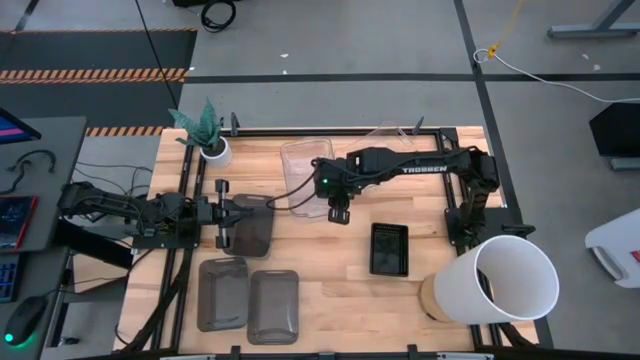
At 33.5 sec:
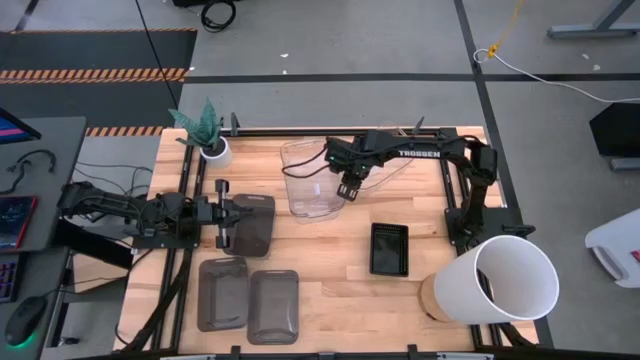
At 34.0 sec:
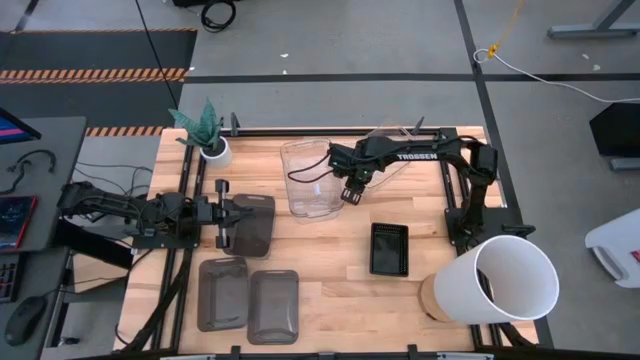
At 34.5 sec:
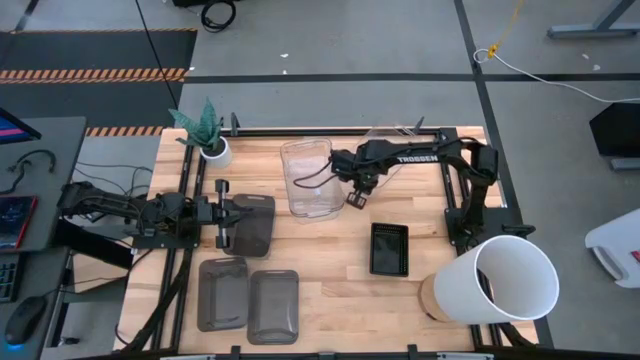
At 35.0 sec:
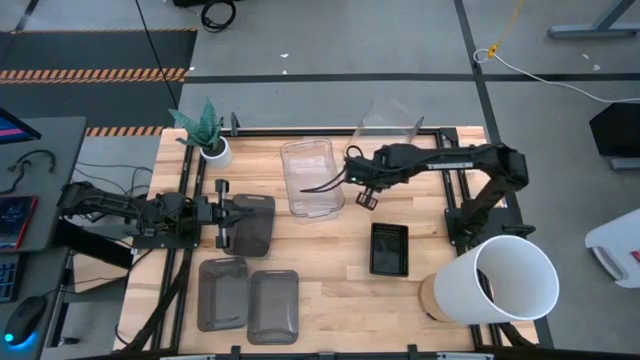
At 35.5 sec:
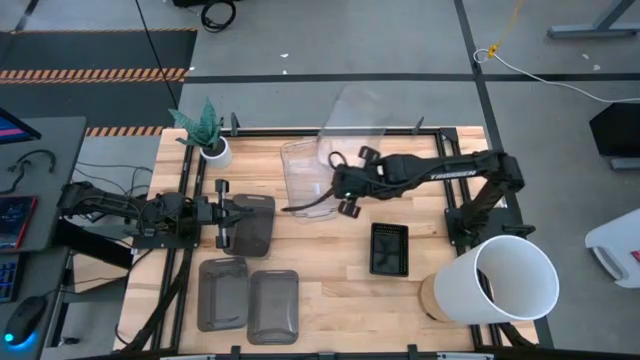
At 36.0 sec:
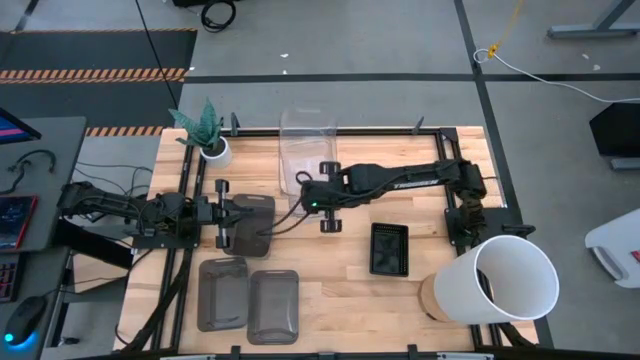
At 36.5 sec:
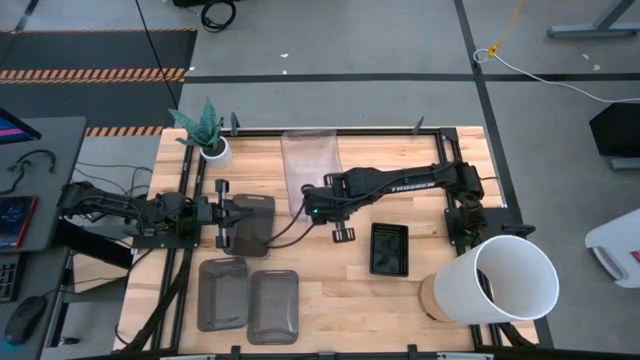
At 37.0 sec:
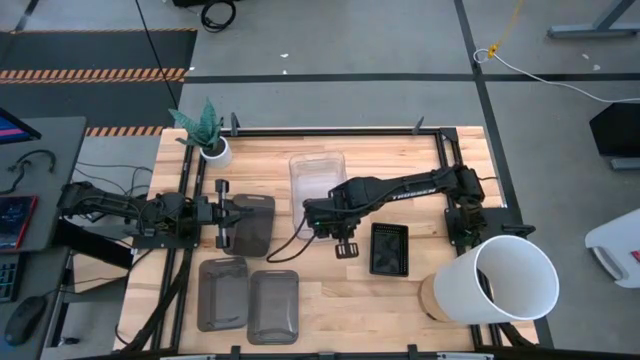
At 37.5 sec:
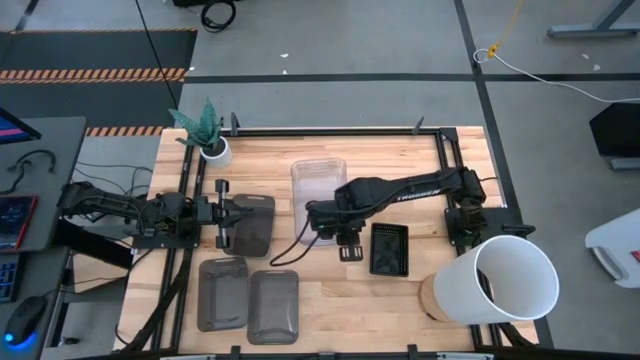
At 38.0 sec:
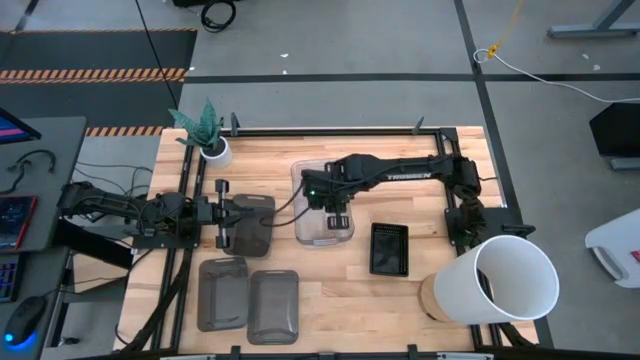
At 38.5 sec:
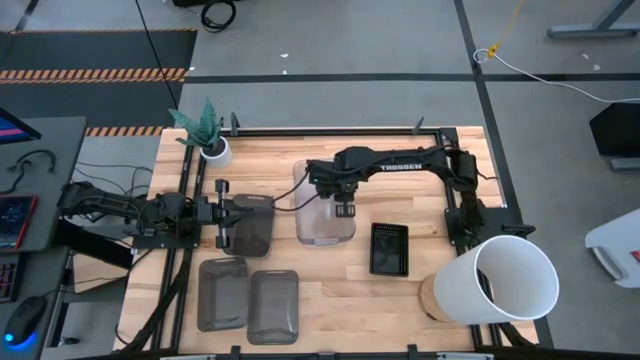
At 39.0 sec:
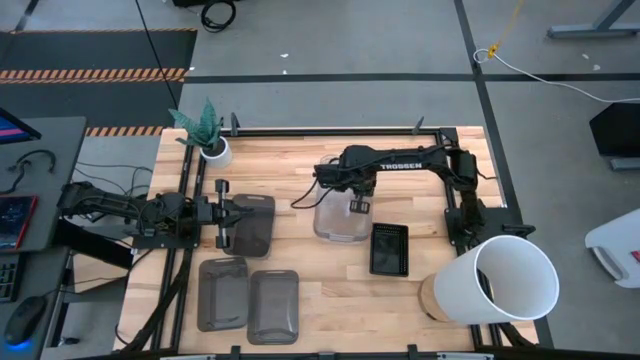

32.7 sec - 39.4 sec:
Stack the right transparent bin on the left transparent bins

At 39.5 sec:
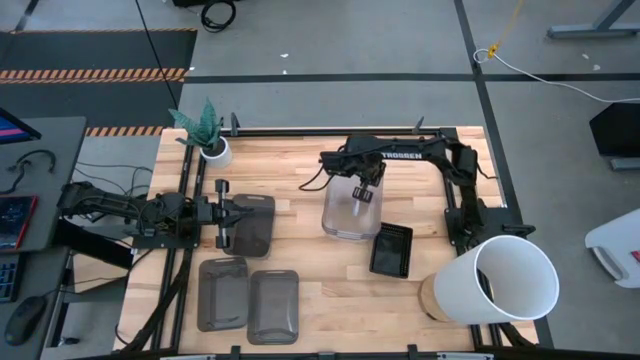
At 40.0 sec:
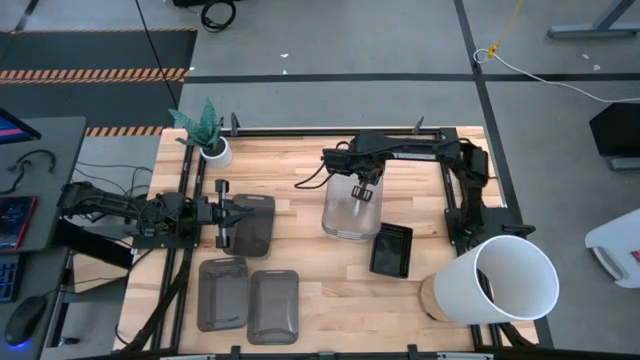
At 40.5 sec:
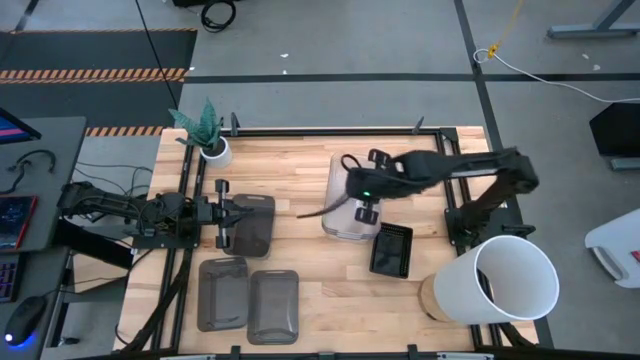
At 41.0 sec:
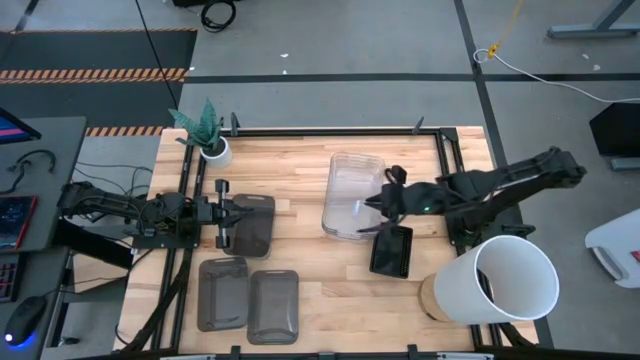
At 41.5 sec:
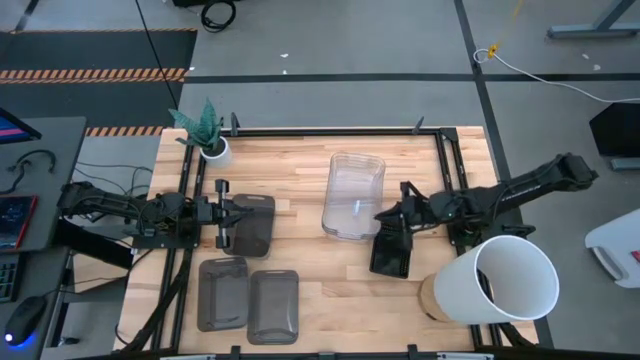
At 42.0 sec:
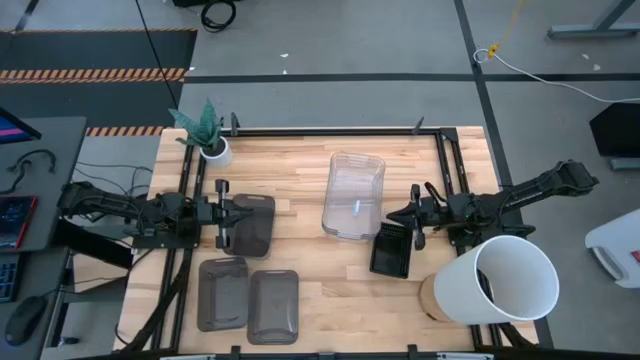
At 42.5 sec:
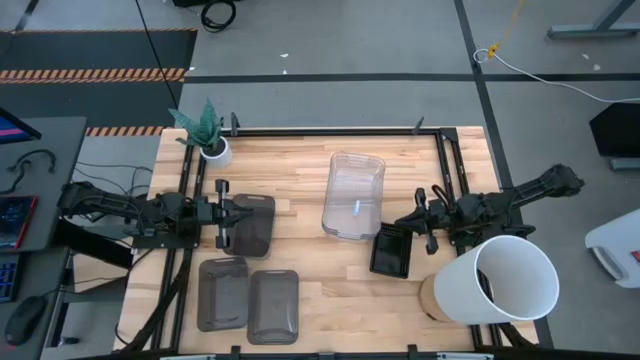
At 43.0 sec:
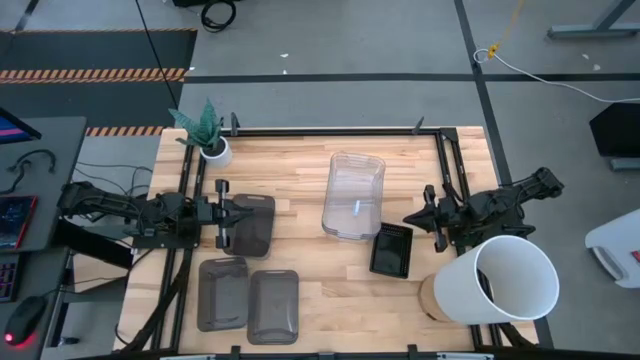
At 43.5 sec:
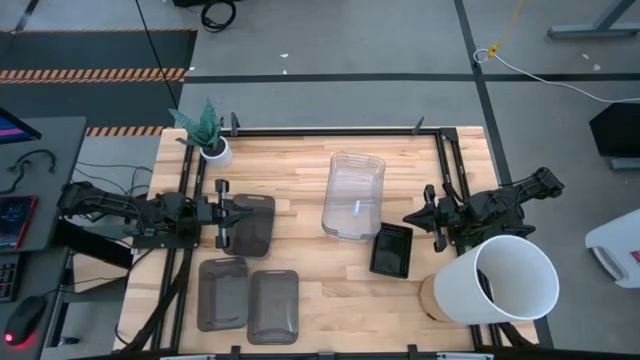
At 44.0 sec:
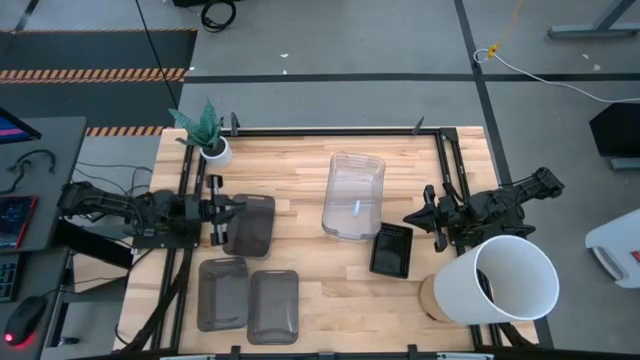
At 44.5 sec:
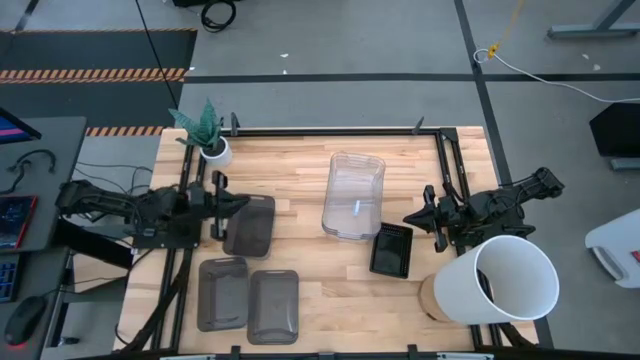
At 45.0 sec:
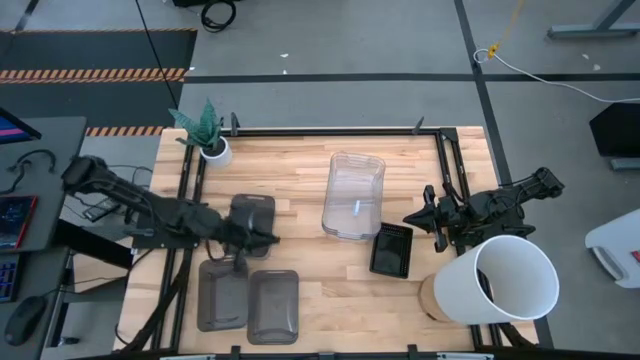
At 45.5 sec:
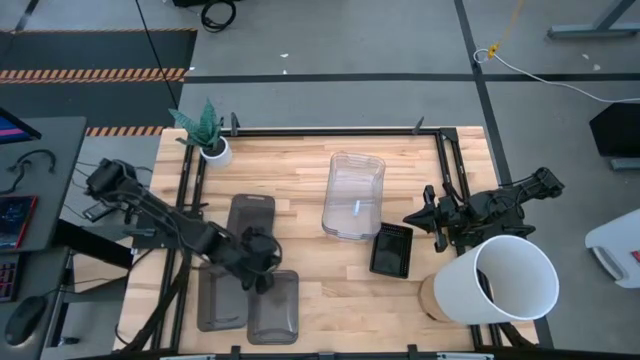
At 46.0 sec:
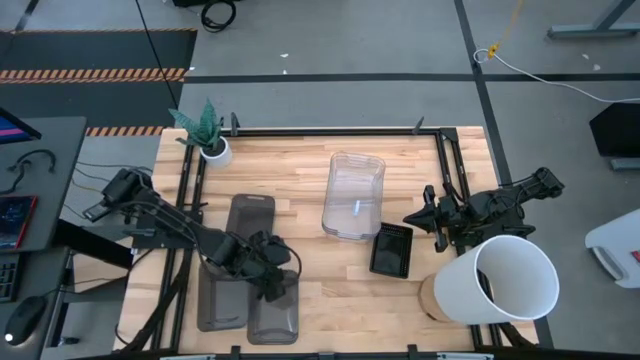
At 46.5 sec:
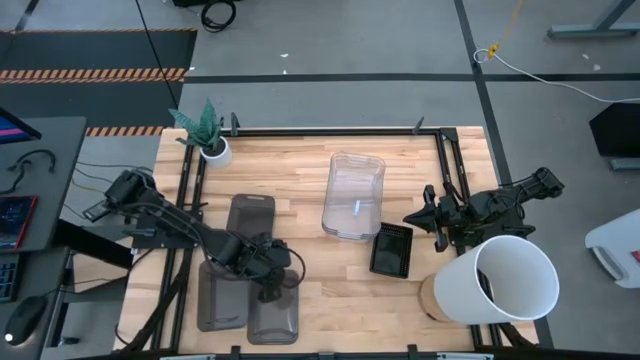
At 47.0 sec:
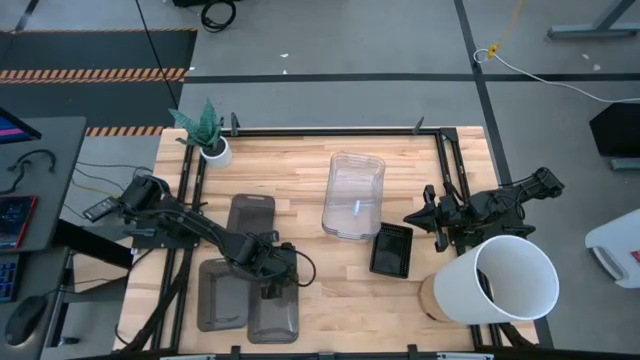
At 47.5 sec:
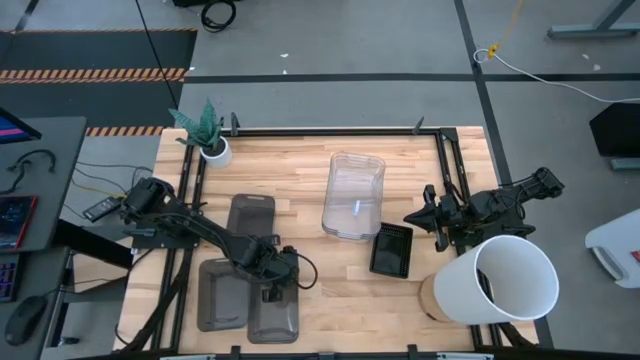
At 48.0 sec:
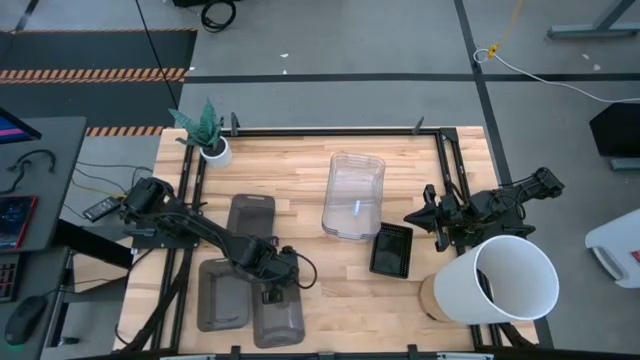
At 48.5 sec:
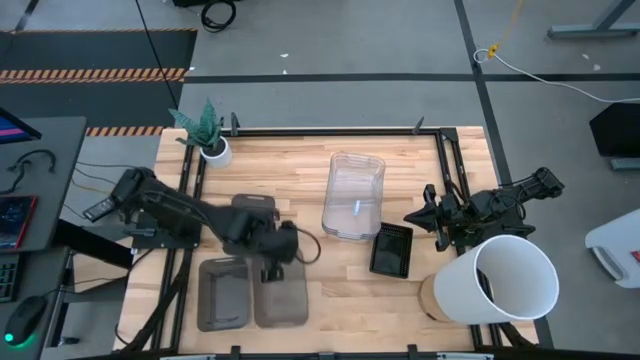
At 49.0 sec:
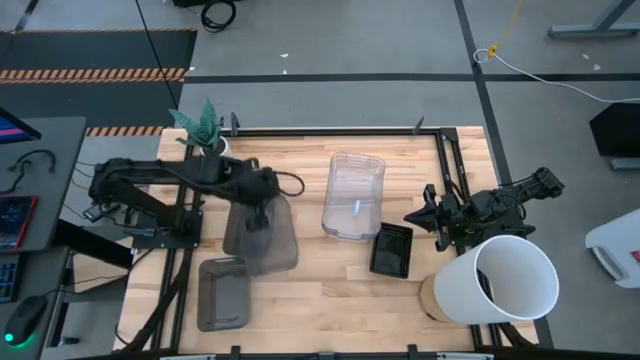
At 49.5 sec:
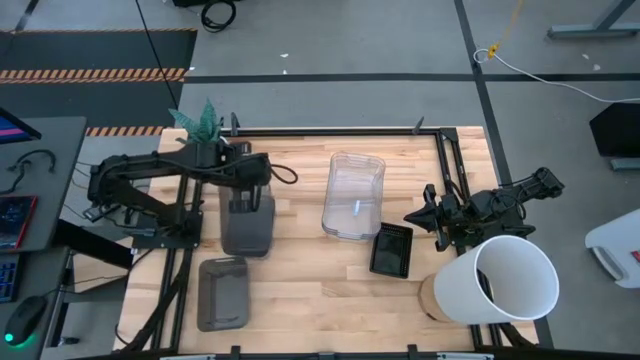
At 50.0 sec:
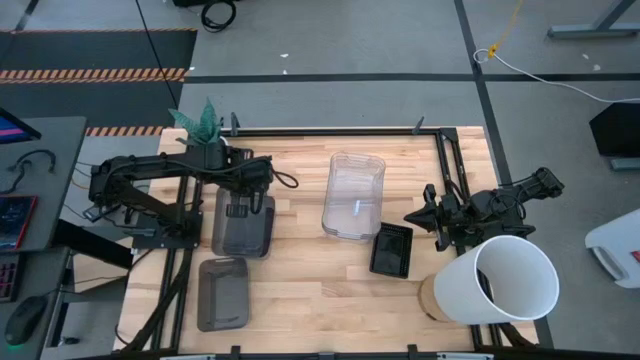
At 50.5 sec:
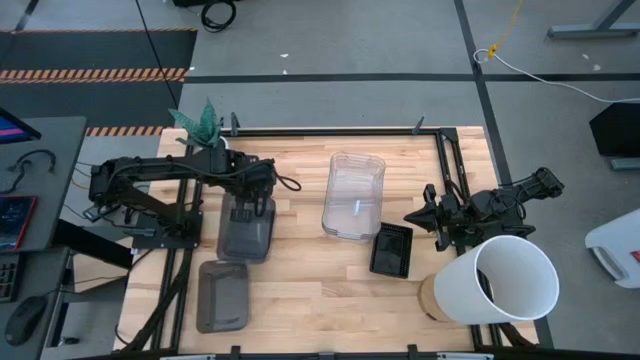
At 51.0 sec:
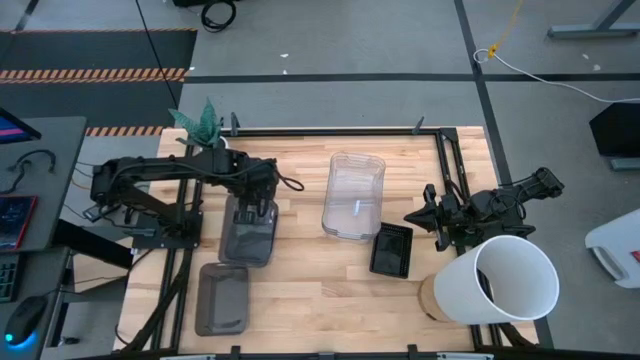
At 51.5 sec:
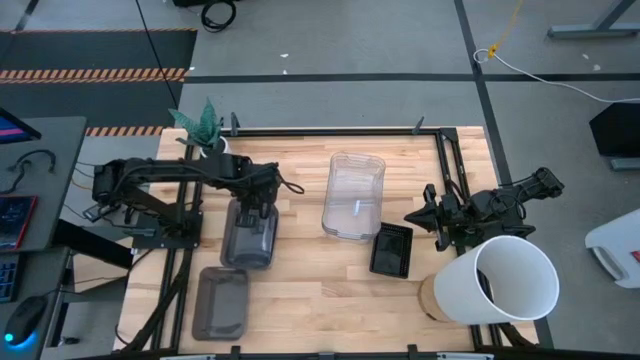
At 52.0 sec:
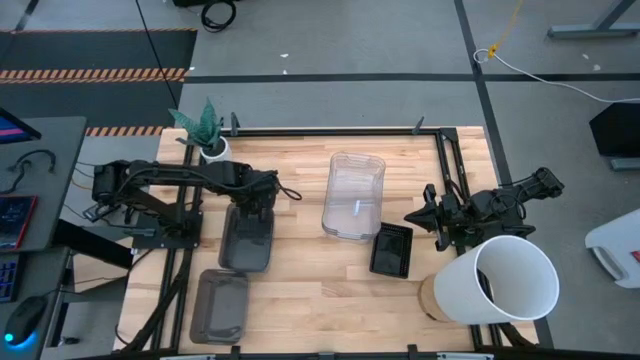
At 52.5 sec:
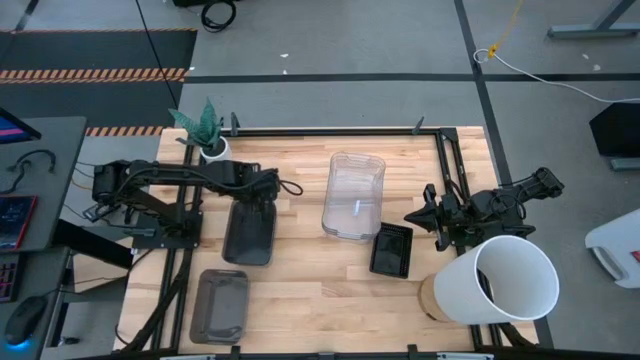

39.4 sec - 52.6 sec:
Stack the bottom right gray bin on the top gray bin
